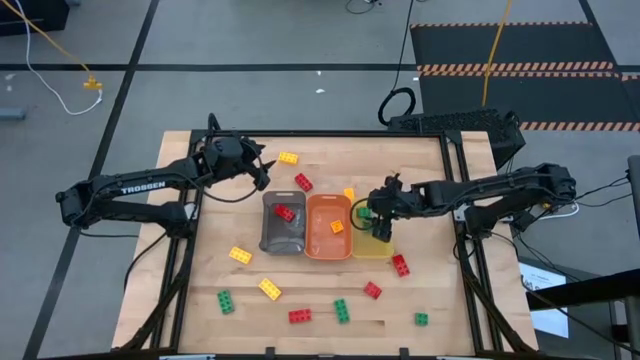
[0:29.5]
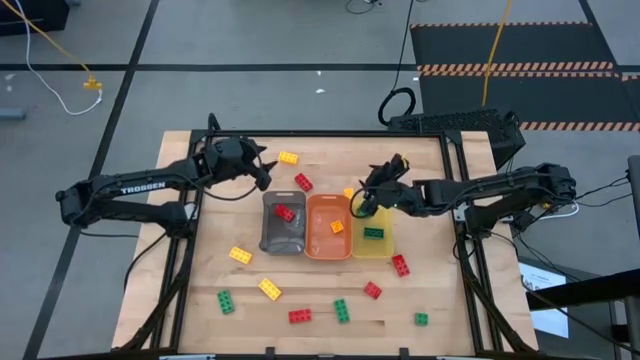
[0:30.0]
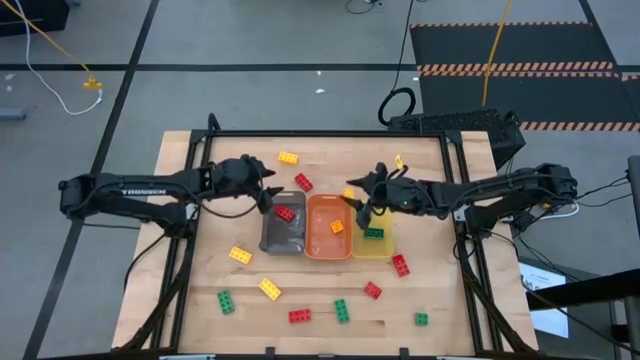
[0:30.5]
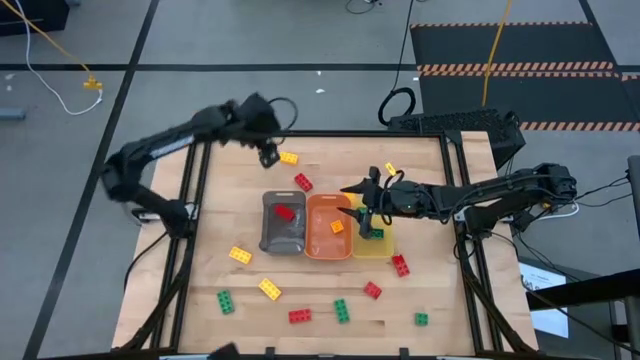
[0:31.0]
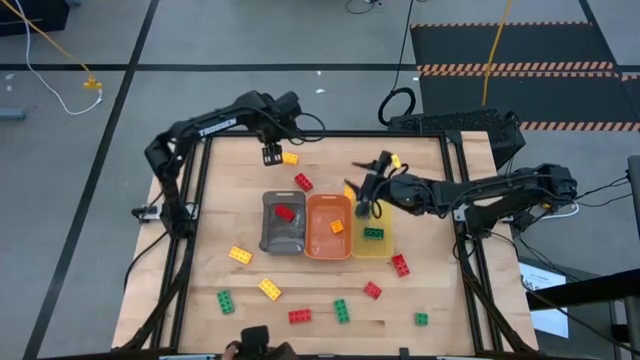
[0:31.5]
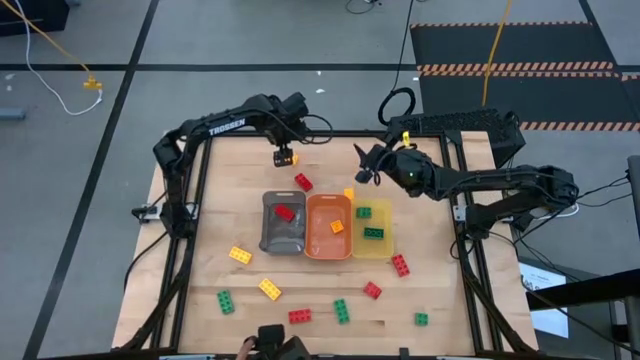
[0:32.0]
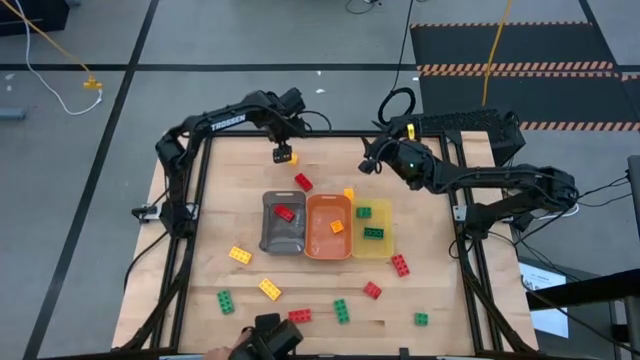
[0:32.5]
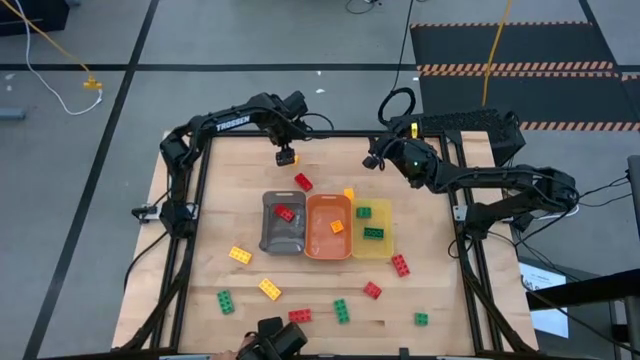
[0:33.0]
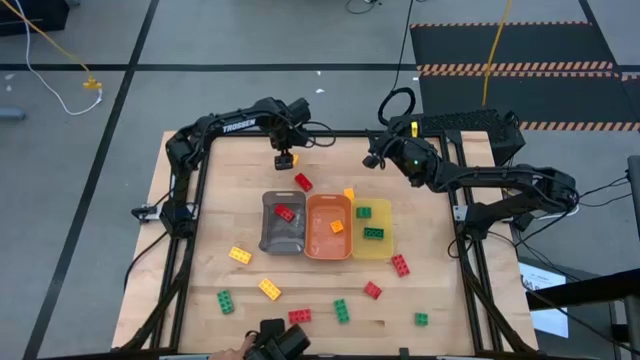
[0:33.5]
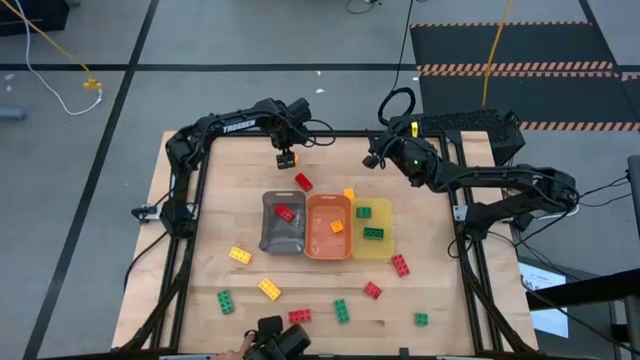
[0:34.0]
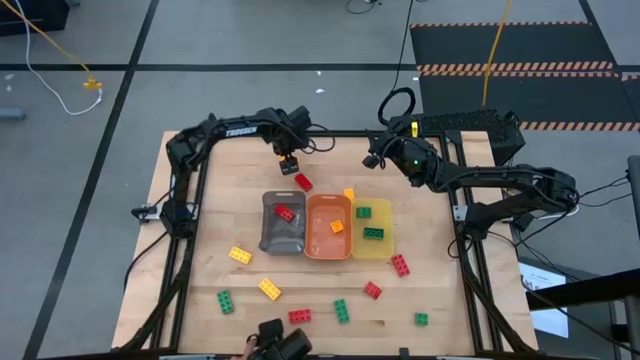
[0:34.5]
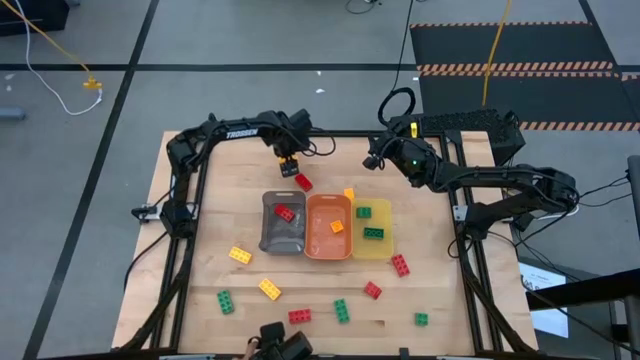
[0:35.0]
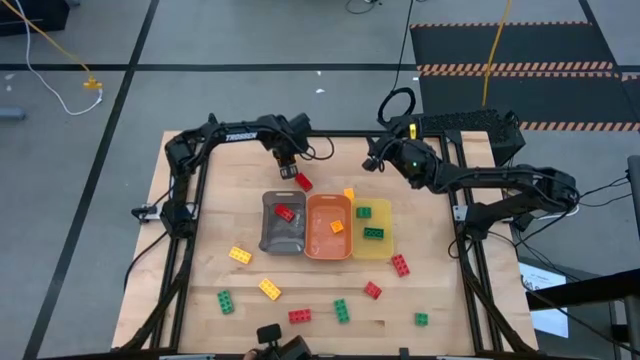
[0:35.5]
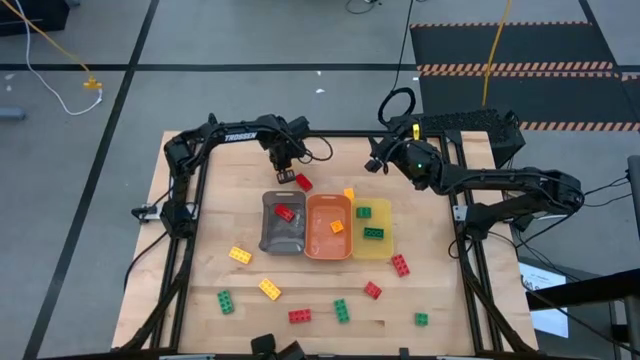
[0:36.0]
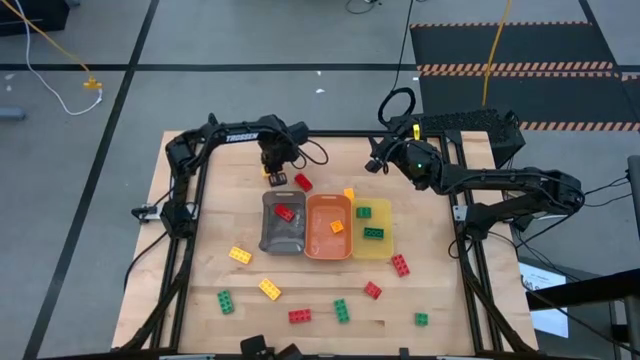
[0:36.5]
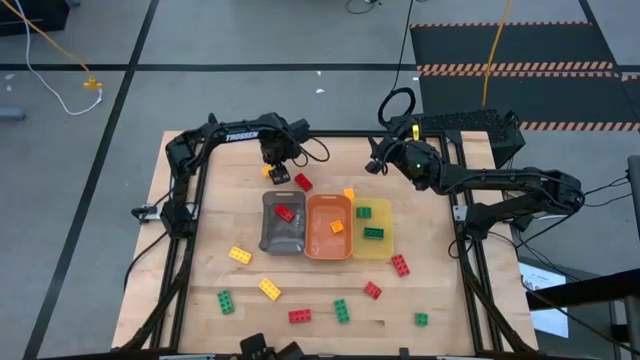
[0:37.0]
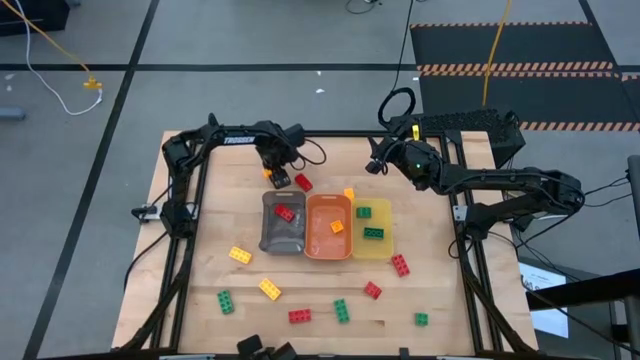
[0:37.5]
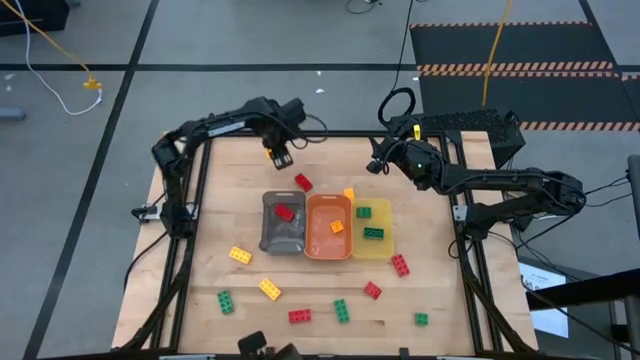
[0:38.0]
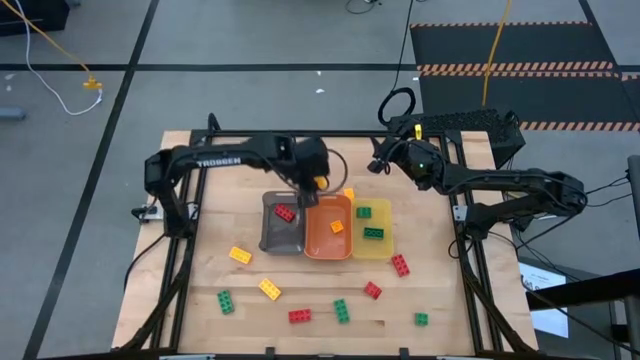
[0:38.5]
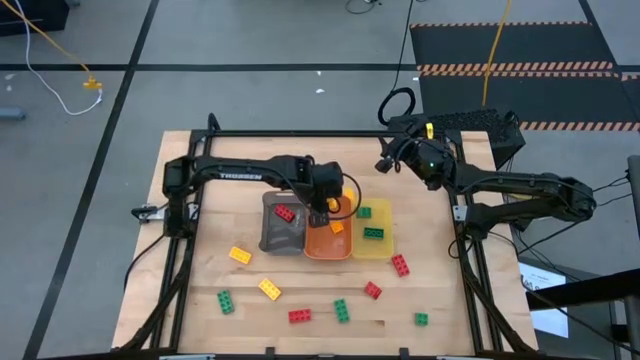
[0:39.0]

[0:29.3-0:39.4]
Task: Sort & place blocks by color
Put the yellow game piece into the orange bin

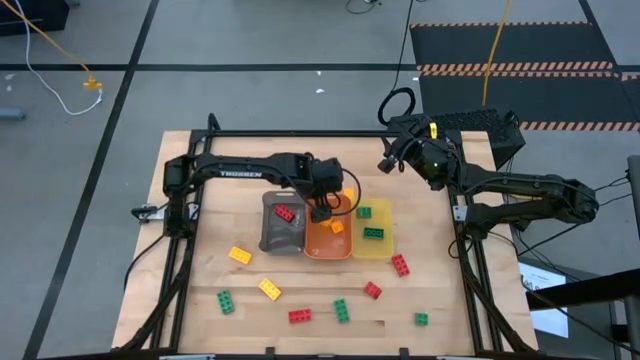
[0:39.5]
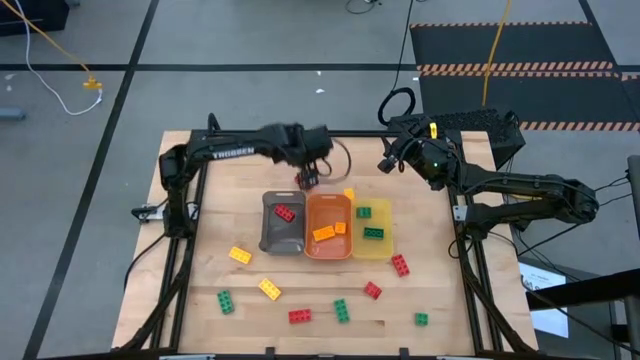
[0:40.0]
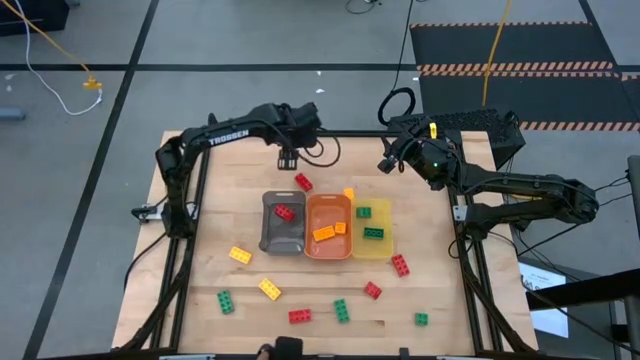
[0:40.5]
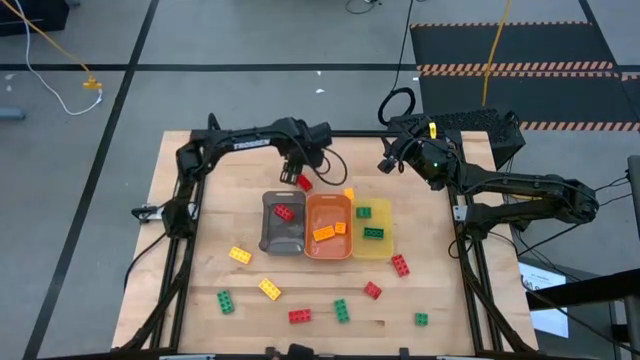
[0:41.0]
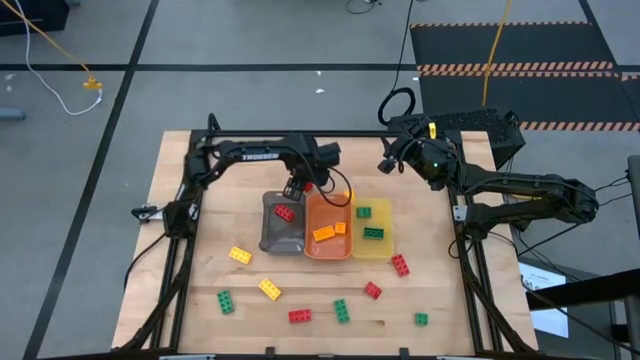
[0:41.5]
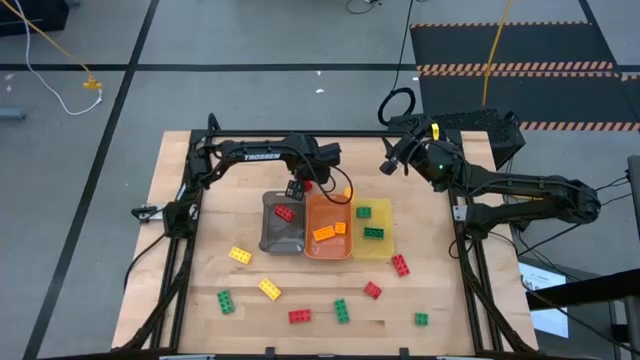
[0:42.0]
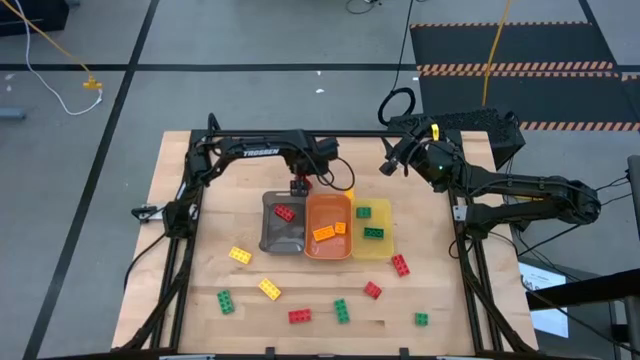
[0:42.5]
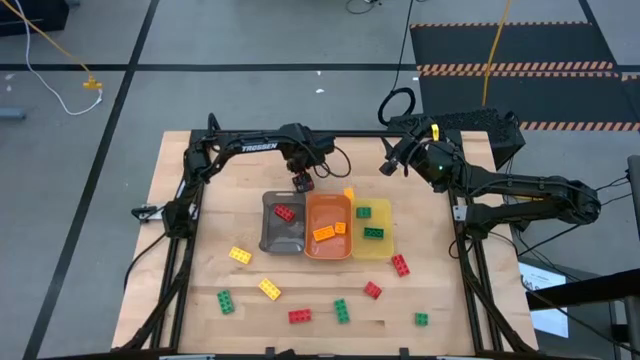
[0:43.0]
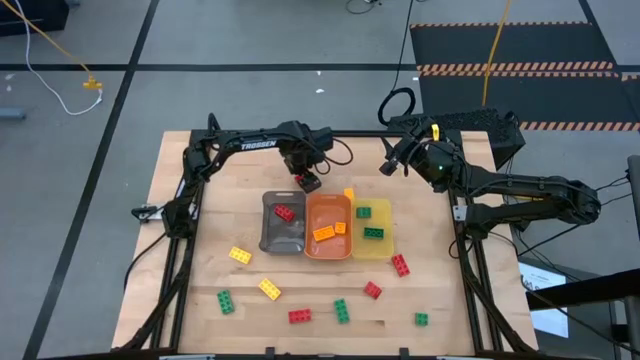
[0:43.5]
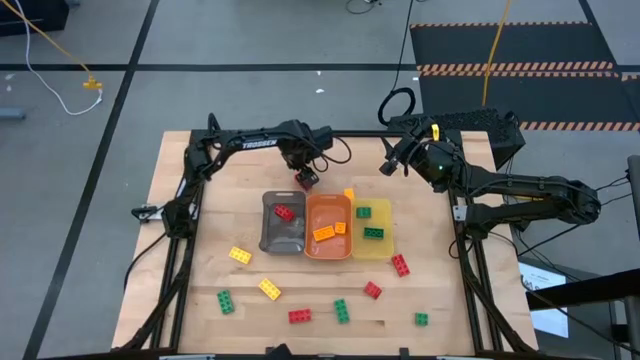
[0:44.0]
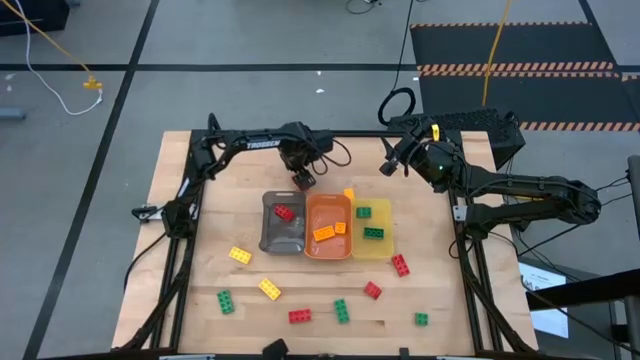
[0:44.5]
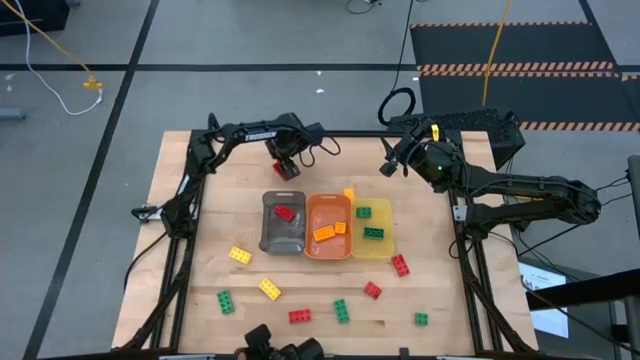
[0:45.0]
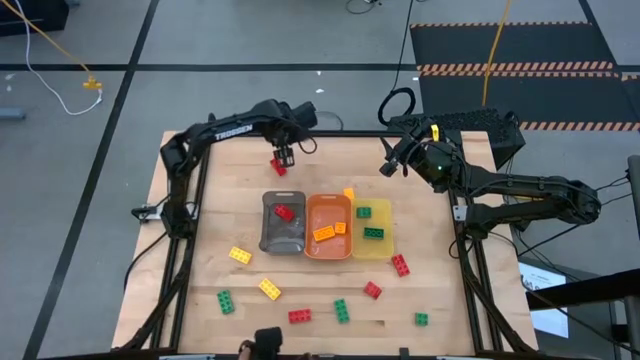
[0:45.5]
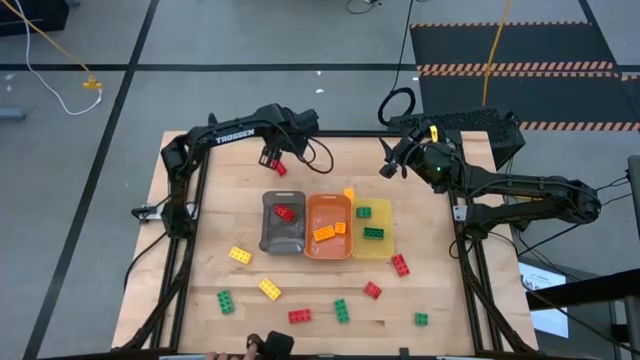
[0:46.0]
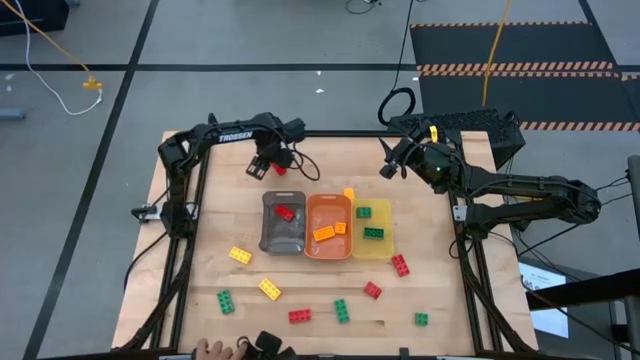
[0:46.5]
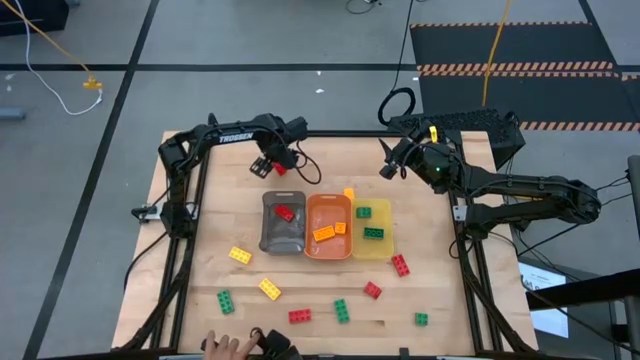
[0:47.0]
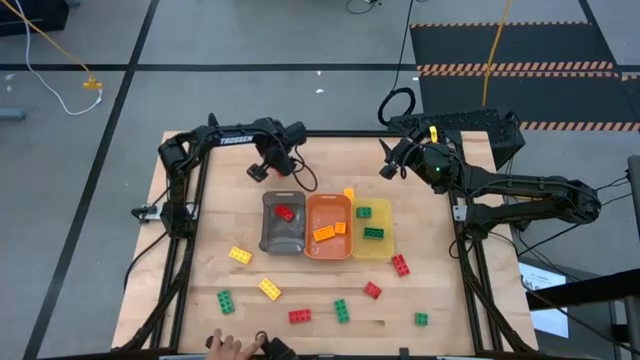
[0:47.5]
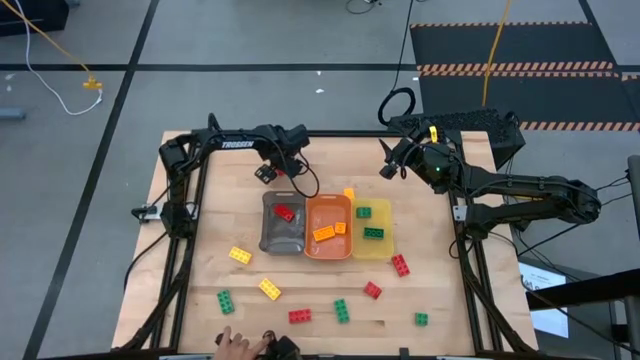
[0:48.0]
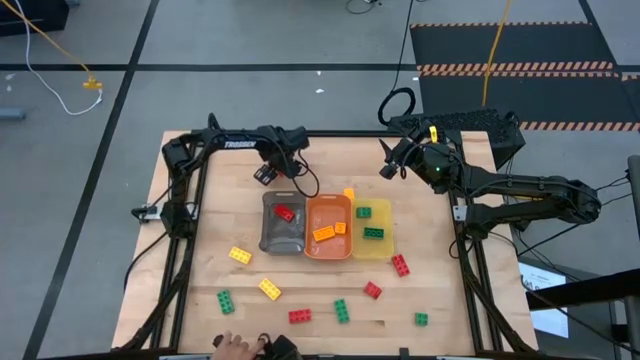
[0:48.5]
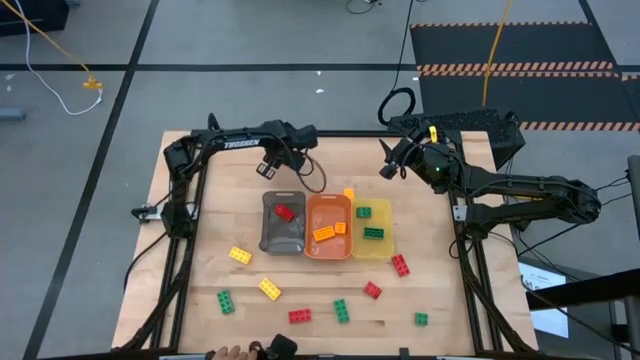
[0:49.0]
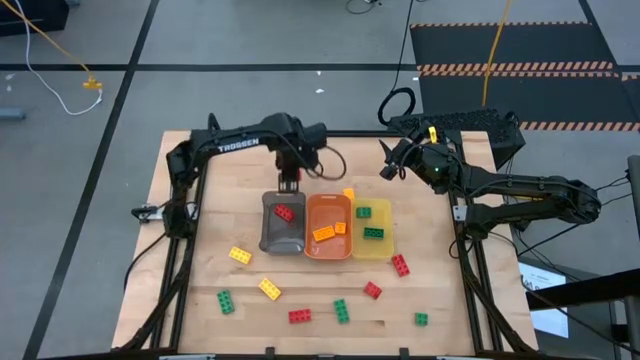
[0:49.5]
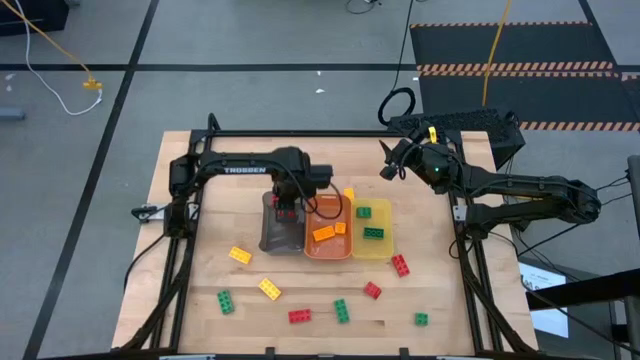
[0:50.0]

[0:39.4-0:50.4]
Put the red game piece into the black bin
